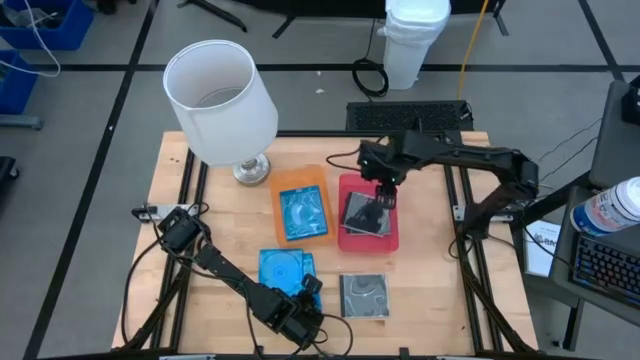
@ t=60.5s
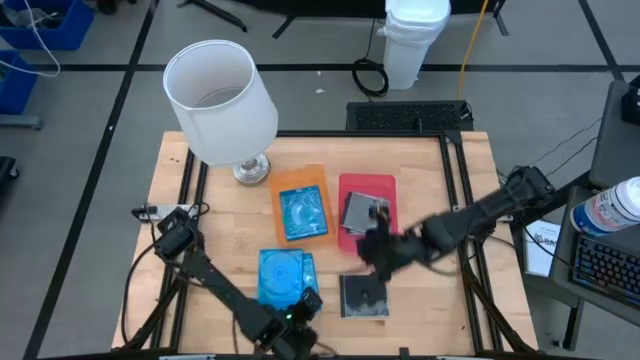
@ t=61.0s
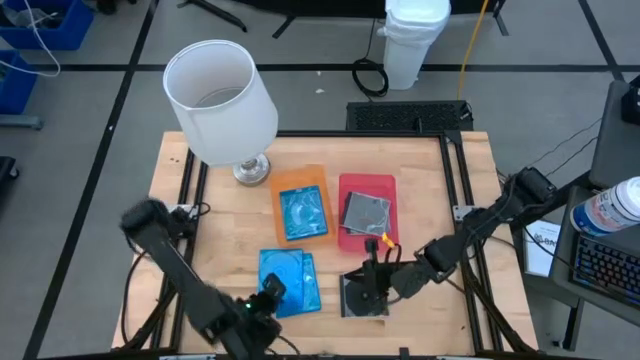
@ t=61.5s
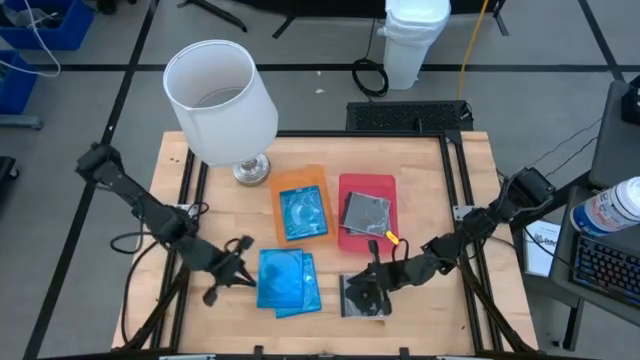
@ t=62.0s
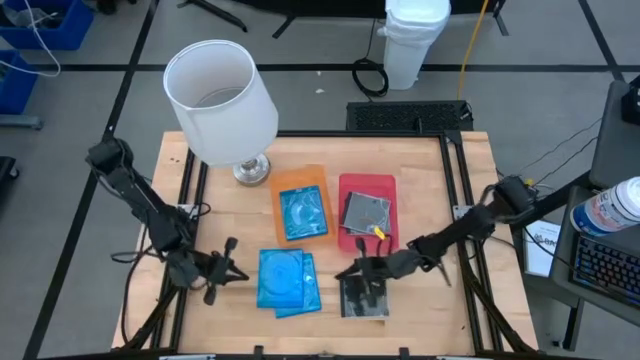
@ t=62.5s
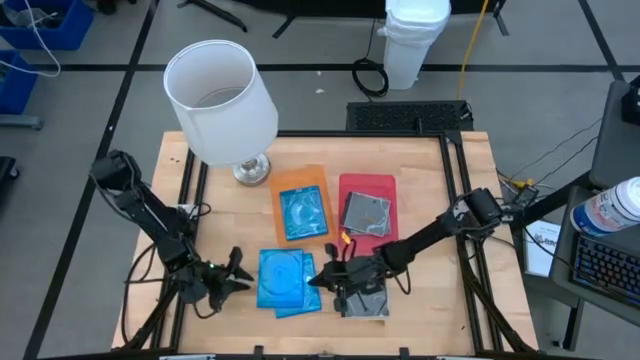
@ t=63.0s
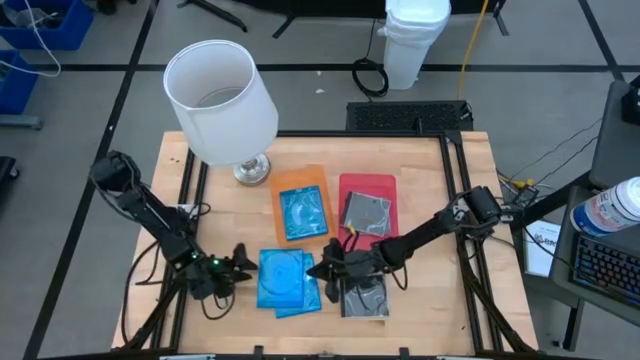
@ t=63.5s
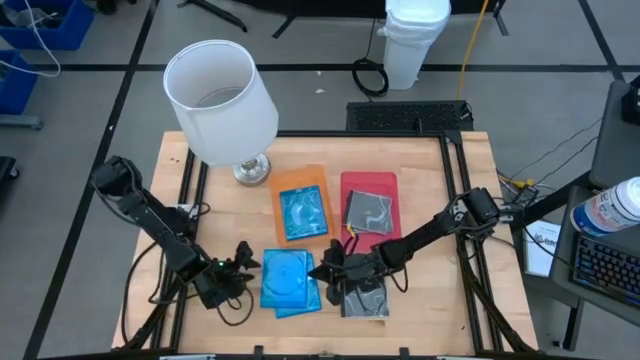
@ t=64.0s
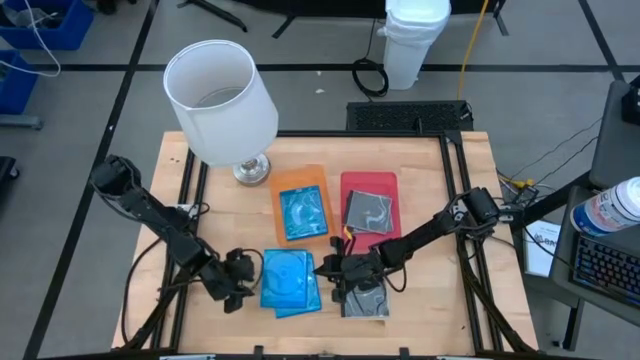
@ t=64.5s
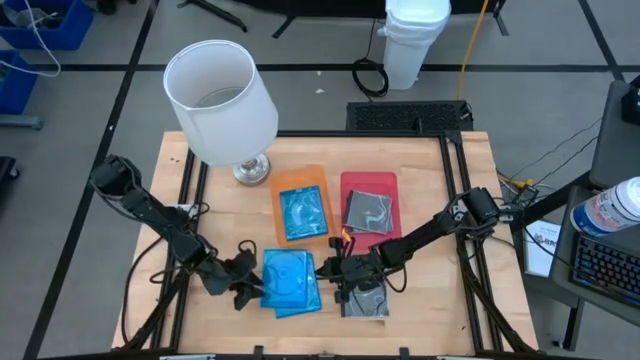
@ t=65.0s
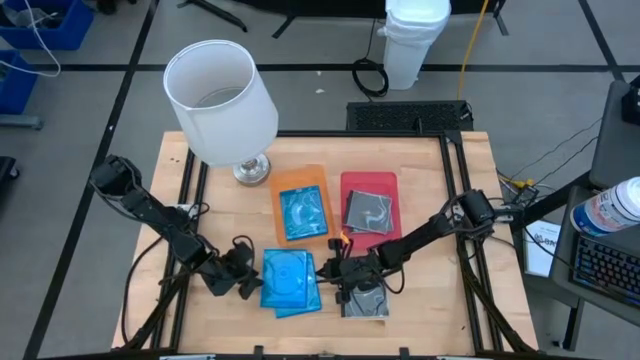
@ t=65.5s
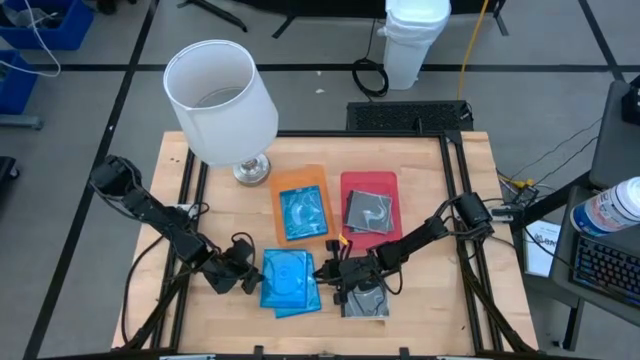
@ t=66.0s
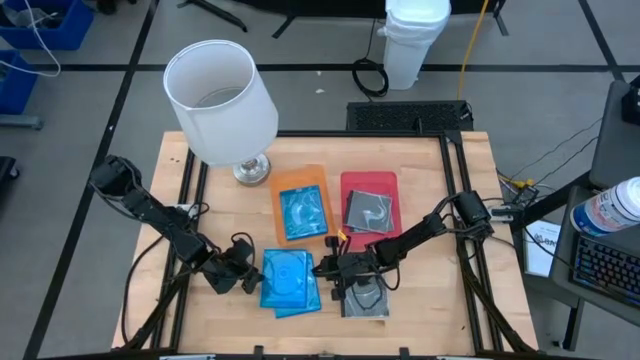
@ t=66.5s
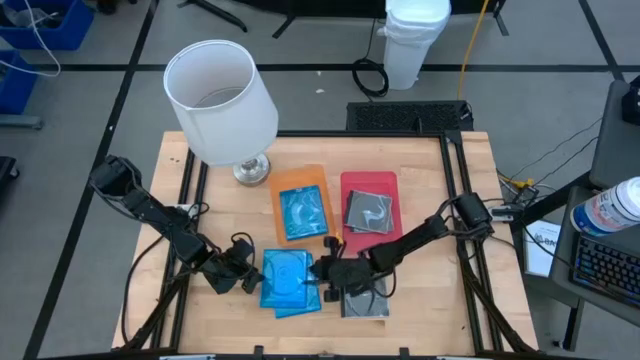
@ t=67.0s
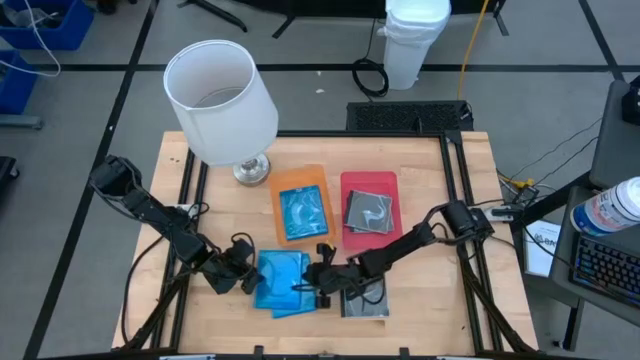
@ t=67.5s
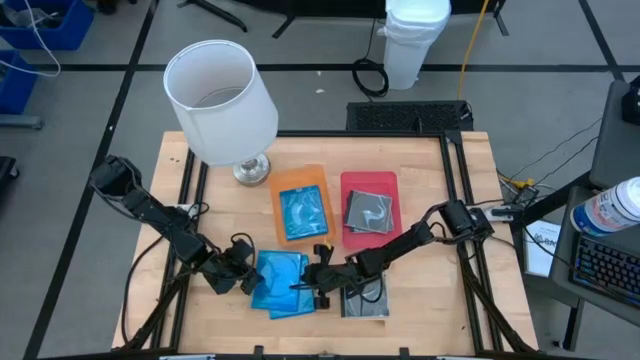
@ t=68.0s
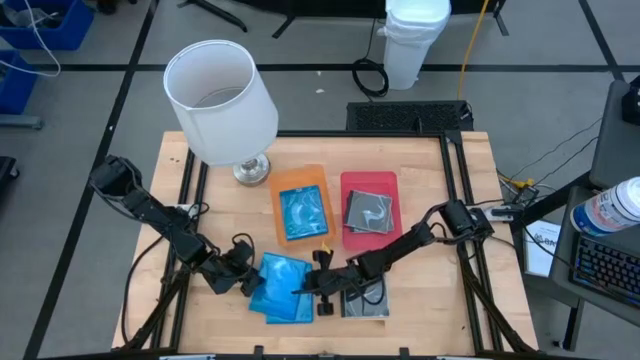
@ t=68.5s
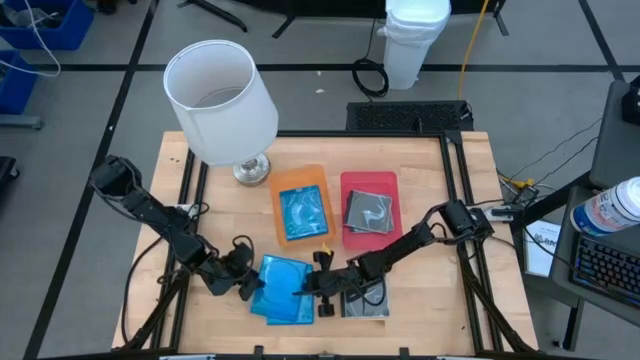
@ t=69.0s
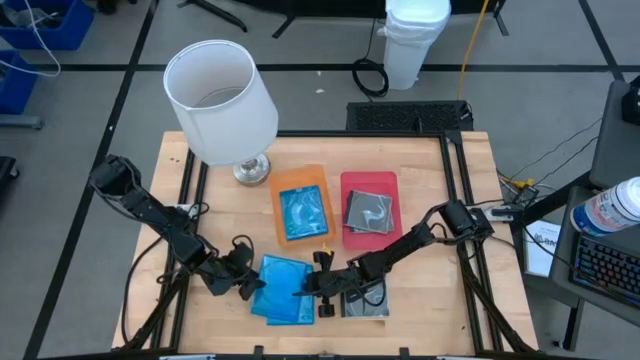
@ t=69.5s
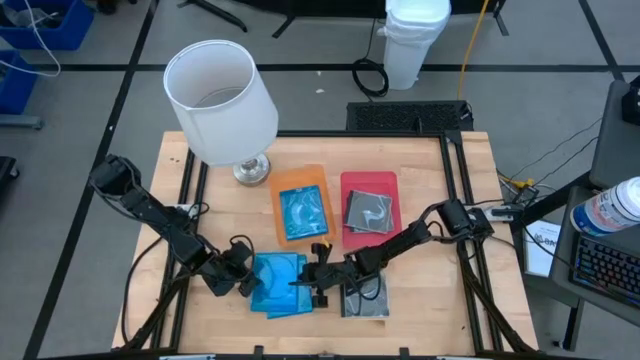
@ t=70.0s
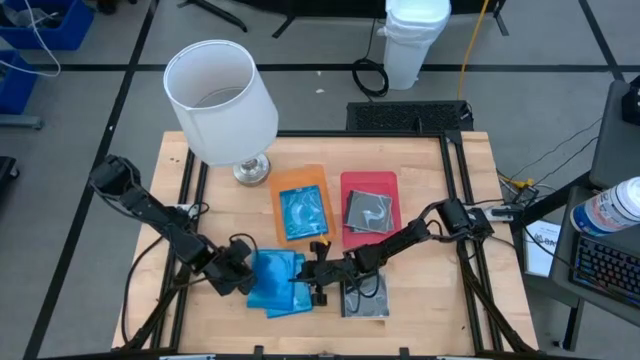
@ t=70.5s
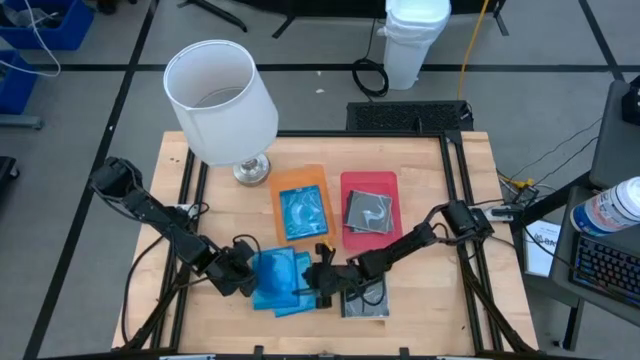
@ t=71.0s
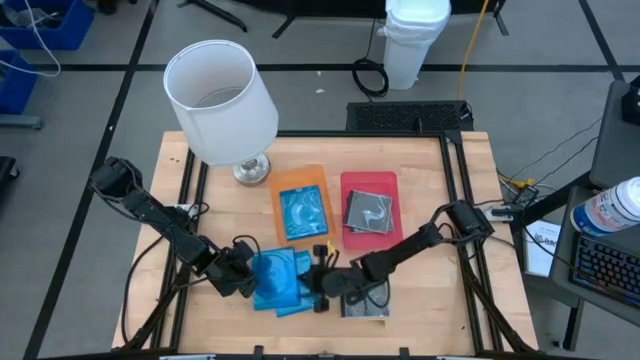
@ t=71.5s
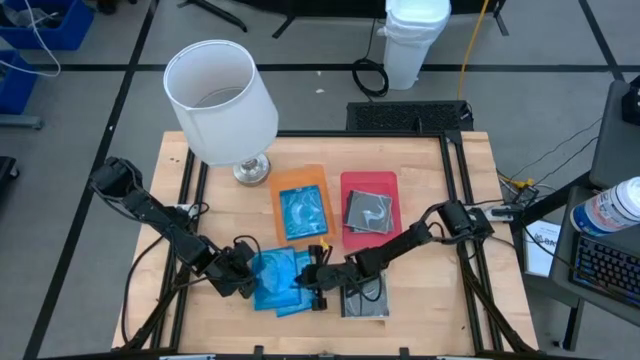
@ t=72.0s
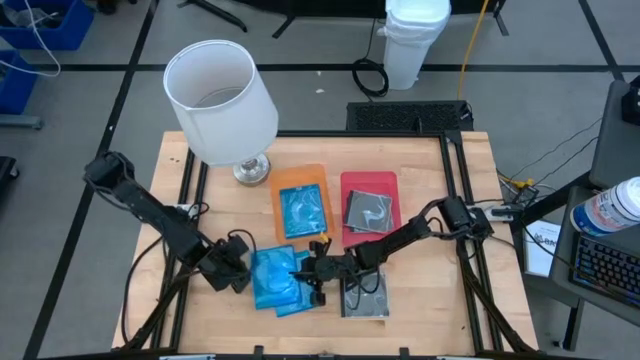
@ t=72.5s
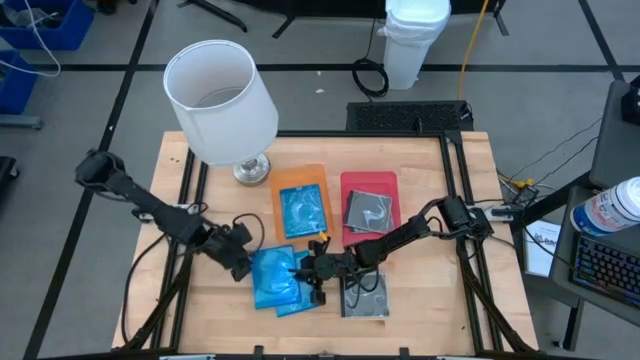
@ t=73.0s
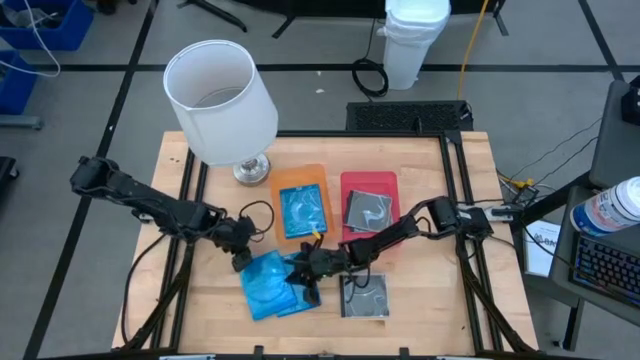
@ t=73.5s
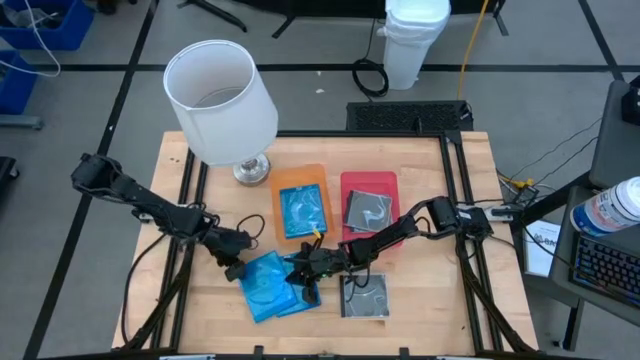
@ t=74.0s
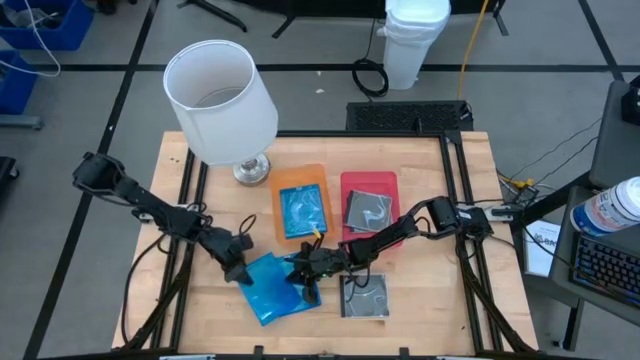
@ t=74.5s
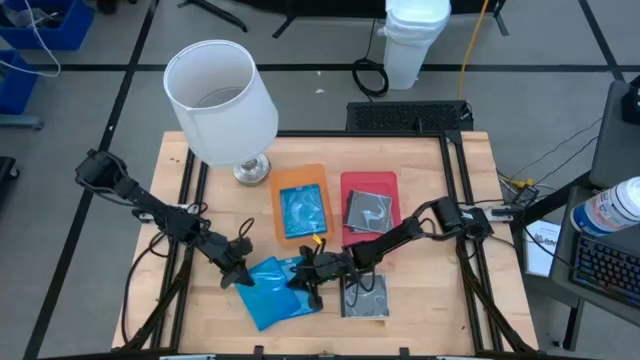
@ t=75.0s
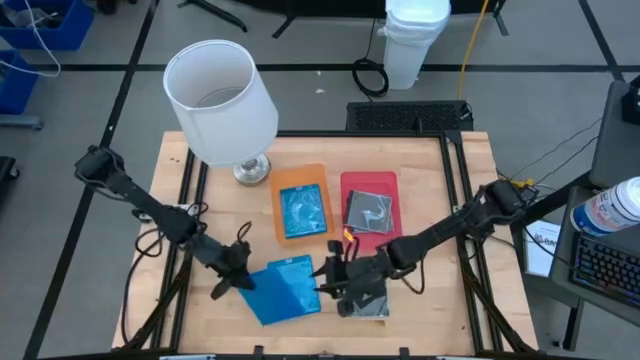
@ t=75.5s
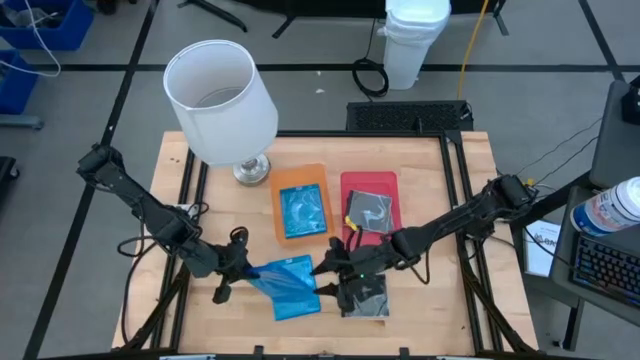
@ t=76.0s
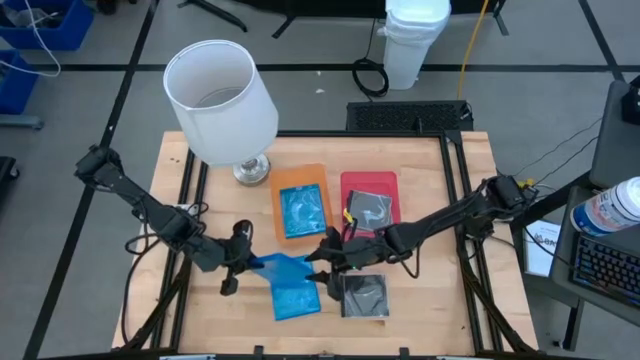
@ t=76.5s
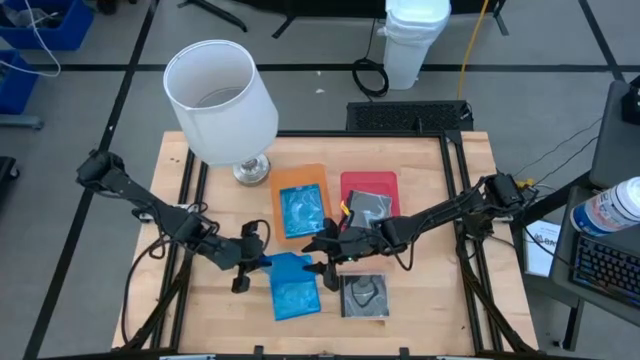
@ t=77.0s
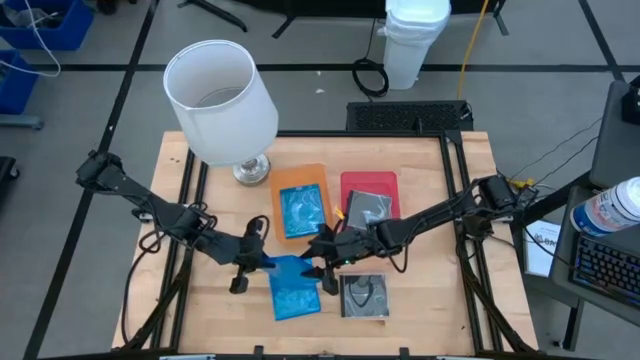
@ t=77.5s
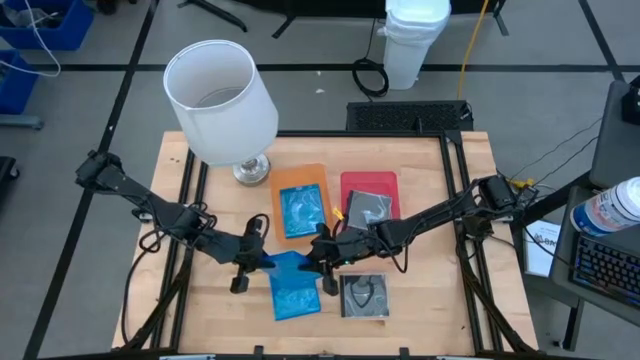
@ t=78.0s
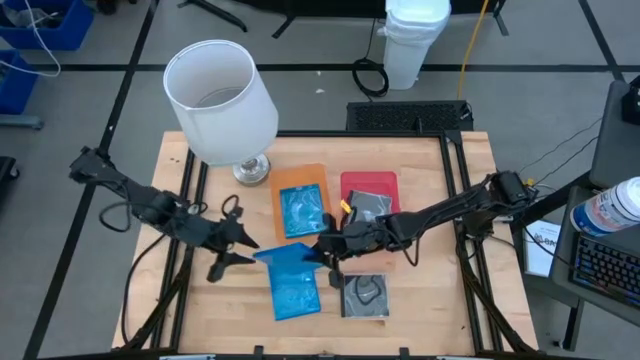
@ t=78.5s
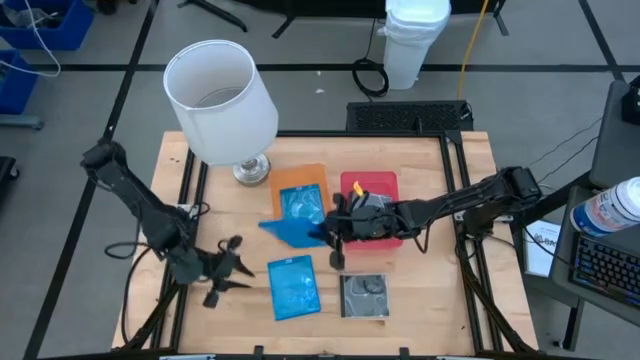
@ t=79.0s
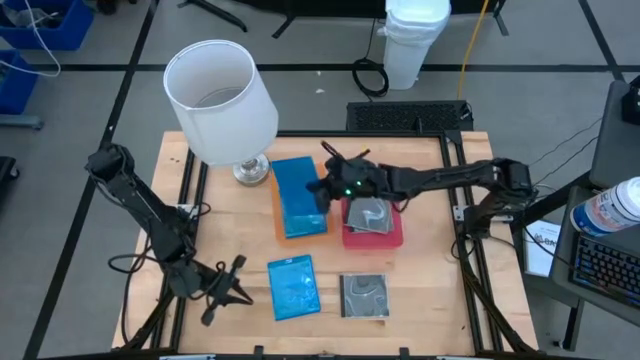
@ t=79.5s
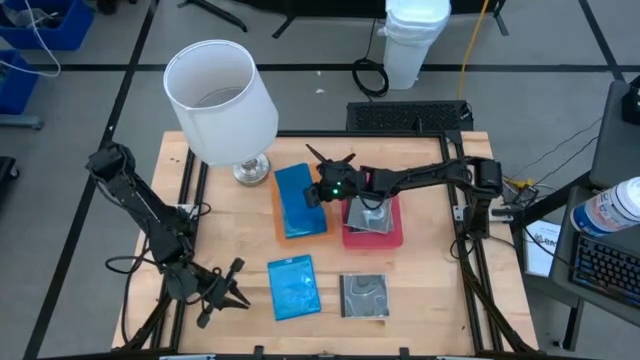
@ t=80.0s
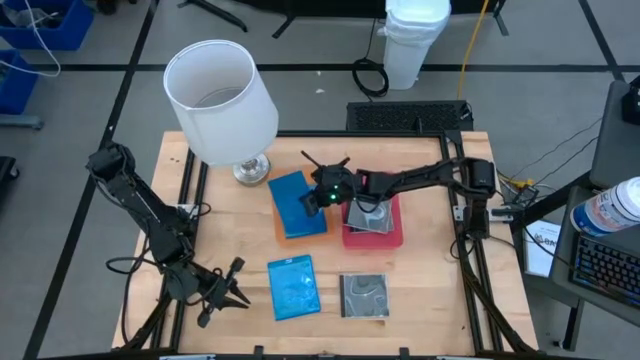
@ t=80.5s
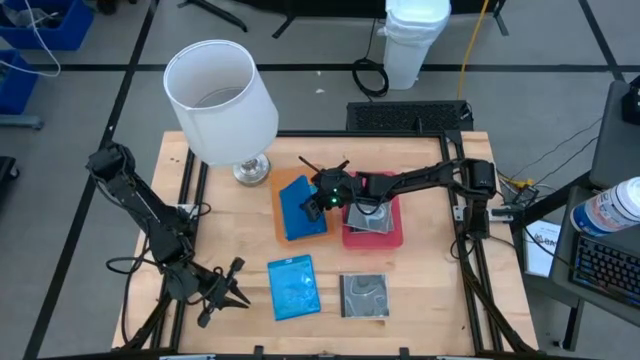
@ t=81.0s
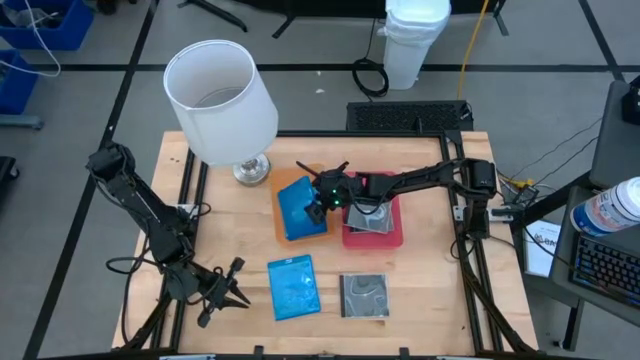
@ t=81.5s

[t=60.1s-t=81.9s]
Task: Pick & place jewel cases by type
Put the blue CD case into the orange bin
